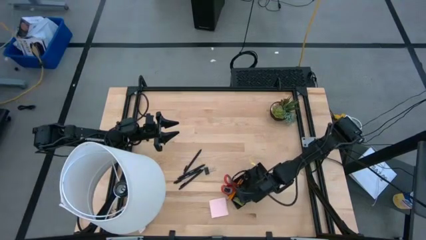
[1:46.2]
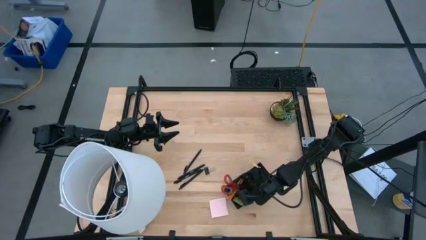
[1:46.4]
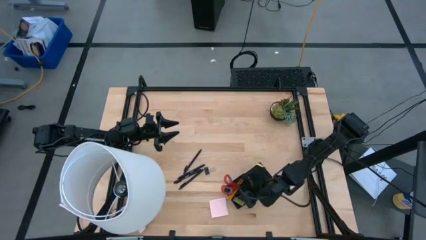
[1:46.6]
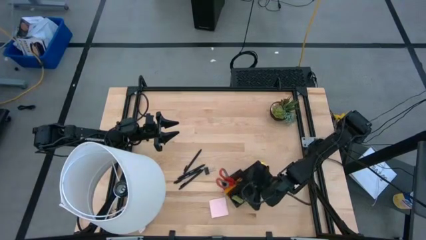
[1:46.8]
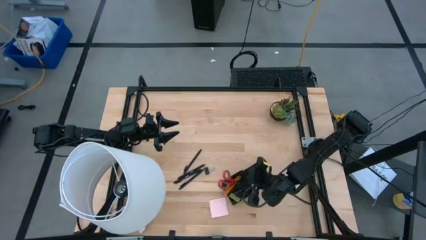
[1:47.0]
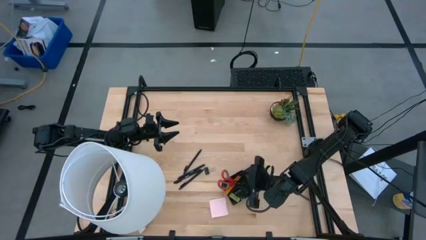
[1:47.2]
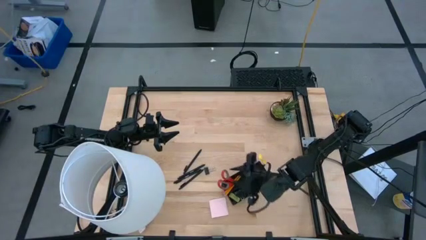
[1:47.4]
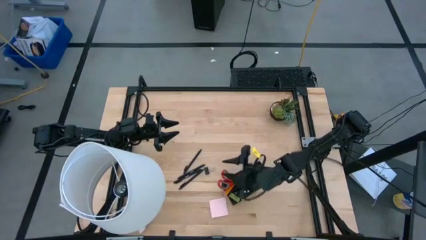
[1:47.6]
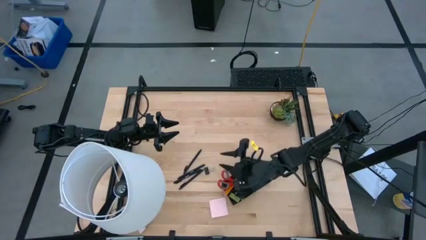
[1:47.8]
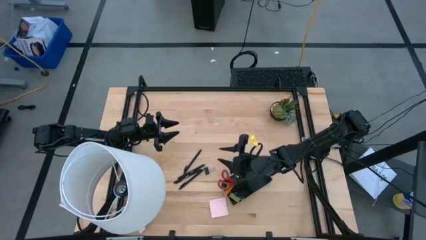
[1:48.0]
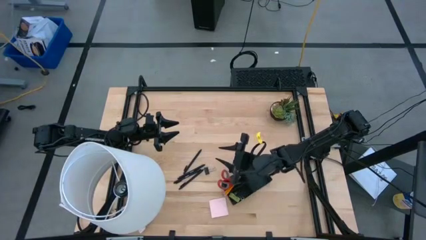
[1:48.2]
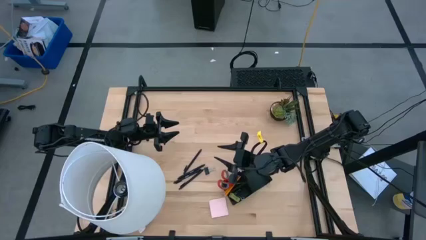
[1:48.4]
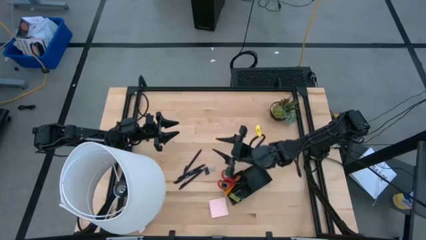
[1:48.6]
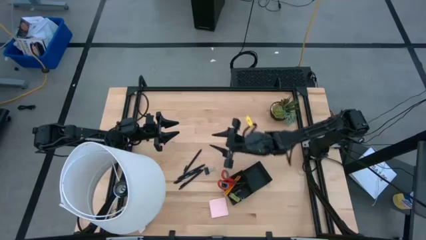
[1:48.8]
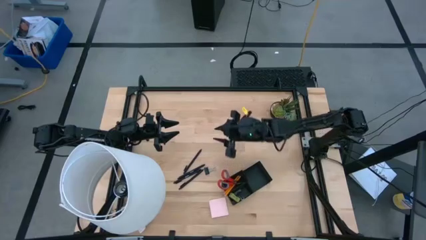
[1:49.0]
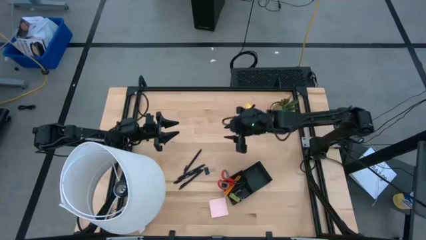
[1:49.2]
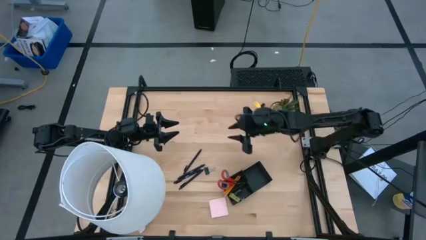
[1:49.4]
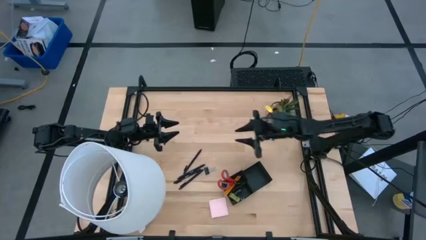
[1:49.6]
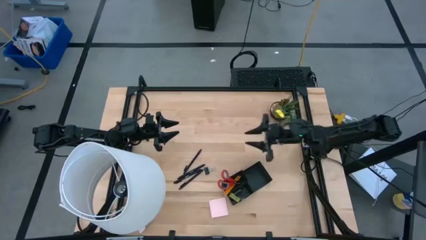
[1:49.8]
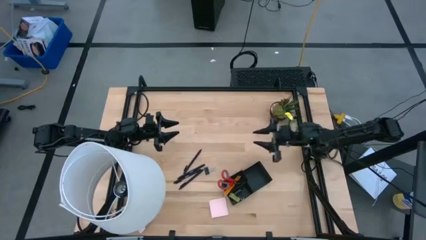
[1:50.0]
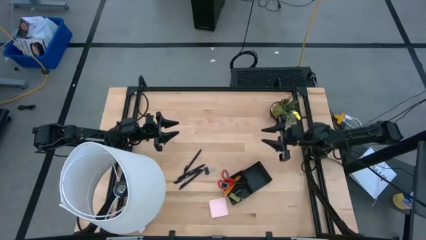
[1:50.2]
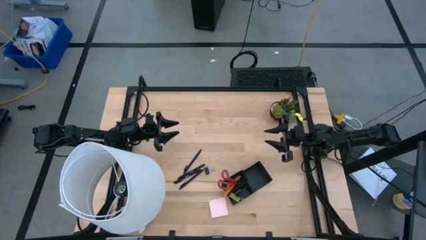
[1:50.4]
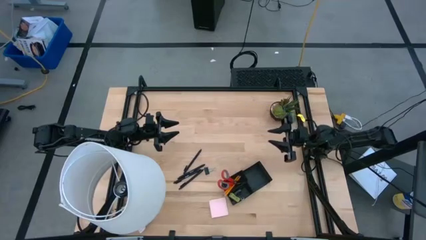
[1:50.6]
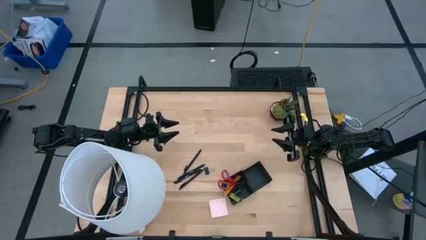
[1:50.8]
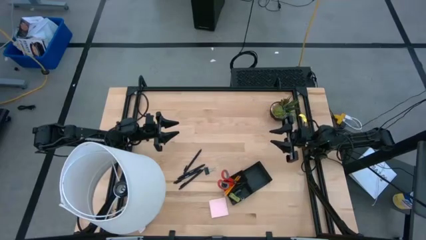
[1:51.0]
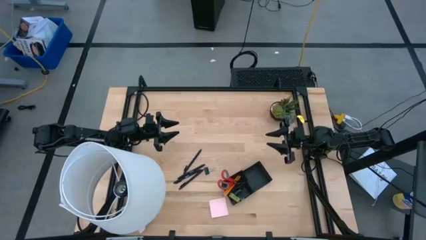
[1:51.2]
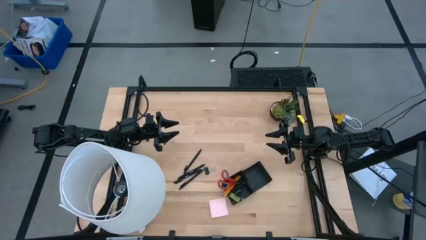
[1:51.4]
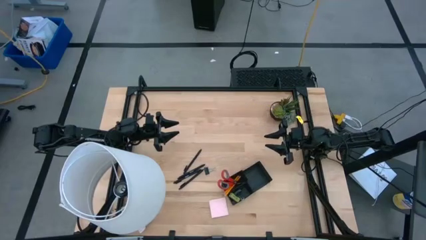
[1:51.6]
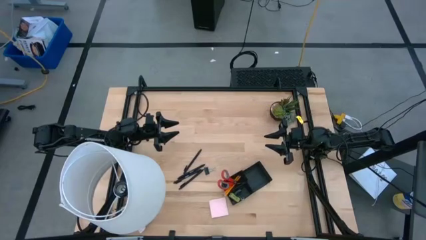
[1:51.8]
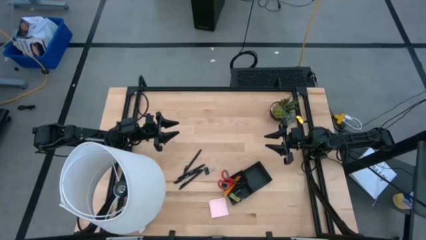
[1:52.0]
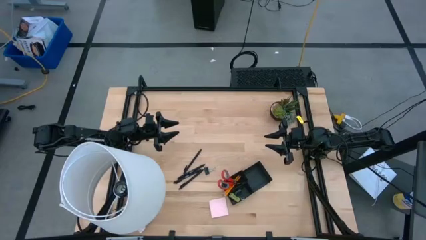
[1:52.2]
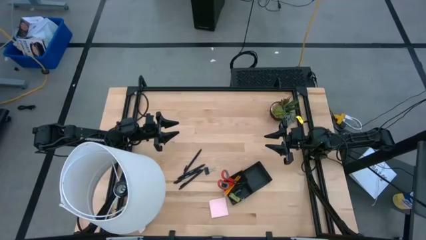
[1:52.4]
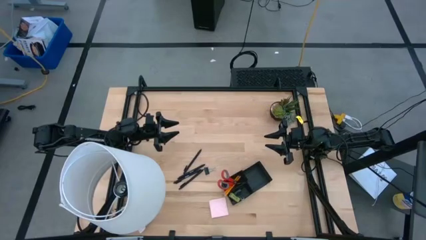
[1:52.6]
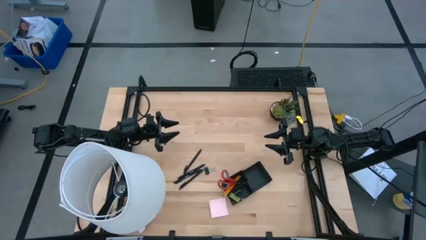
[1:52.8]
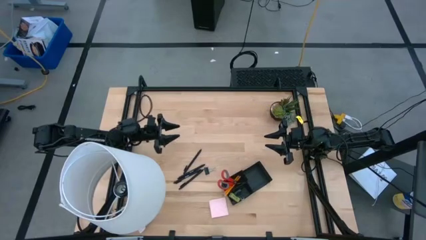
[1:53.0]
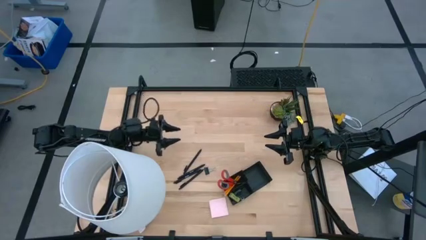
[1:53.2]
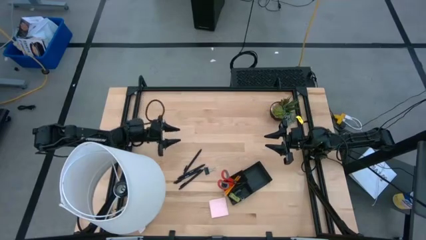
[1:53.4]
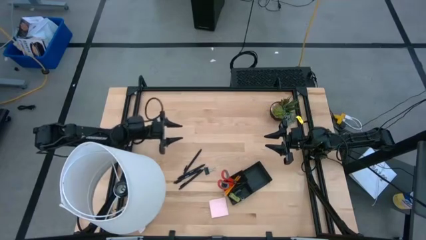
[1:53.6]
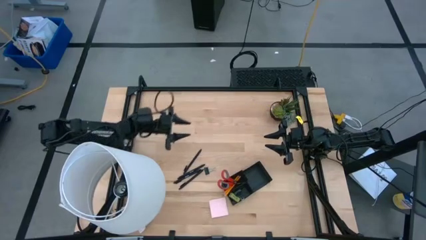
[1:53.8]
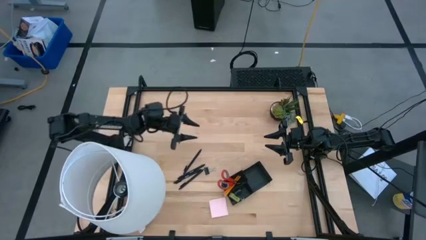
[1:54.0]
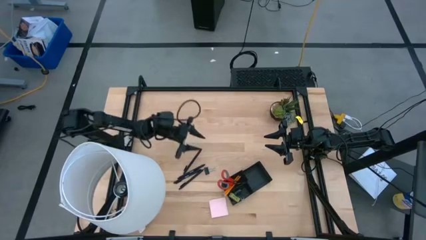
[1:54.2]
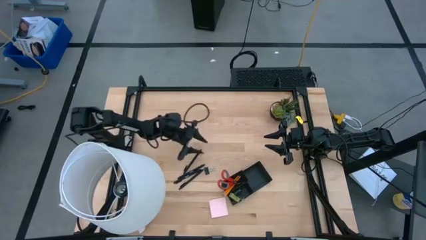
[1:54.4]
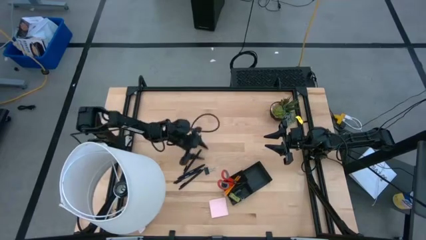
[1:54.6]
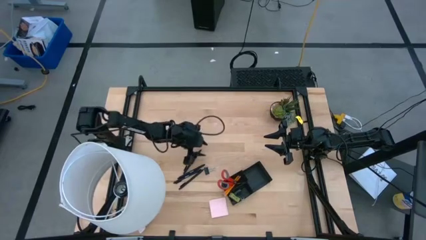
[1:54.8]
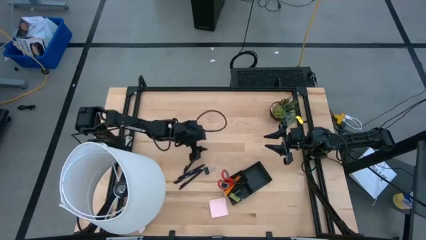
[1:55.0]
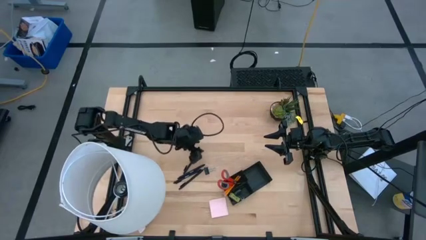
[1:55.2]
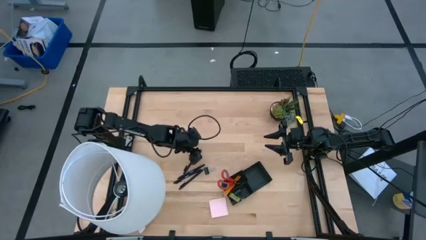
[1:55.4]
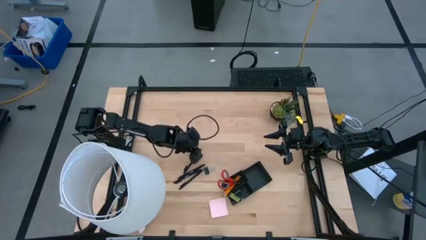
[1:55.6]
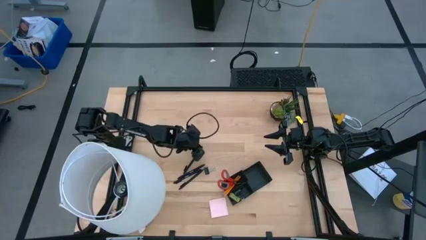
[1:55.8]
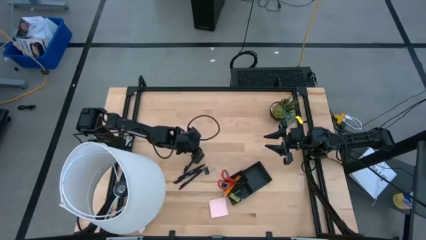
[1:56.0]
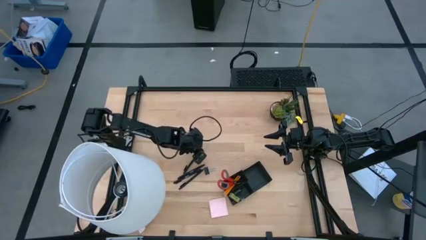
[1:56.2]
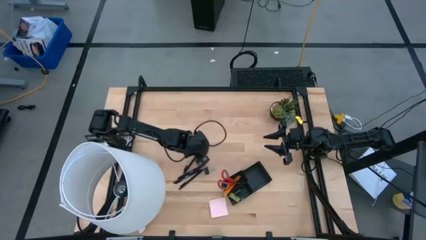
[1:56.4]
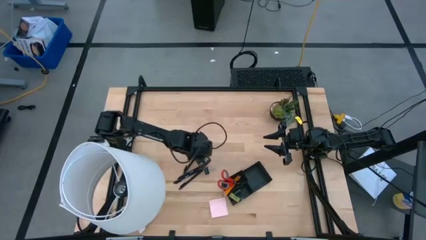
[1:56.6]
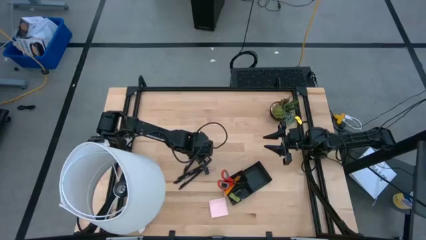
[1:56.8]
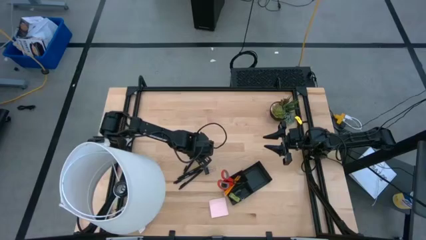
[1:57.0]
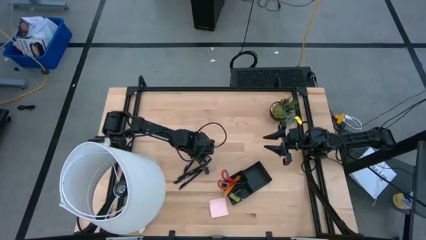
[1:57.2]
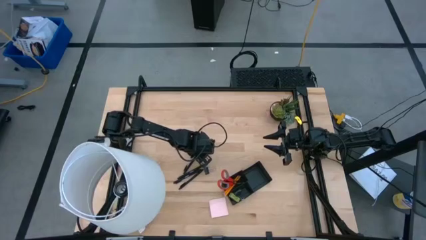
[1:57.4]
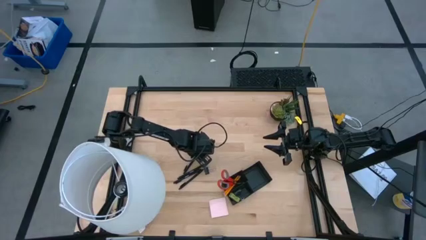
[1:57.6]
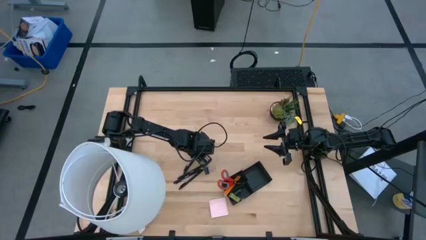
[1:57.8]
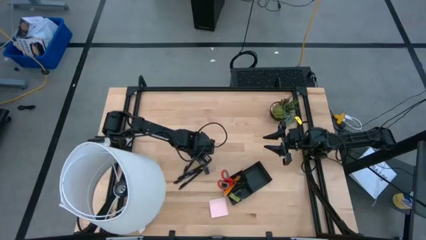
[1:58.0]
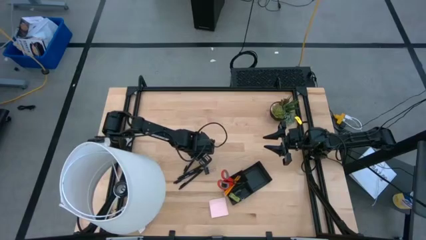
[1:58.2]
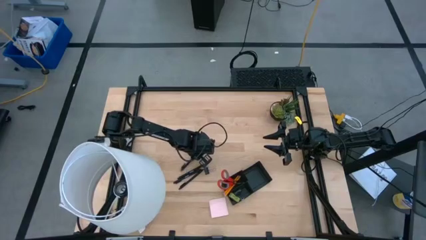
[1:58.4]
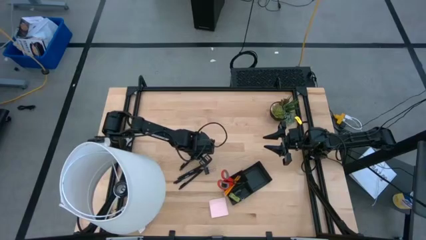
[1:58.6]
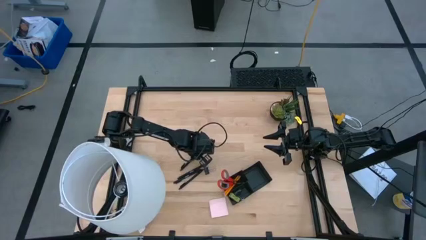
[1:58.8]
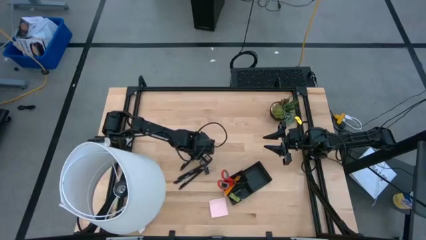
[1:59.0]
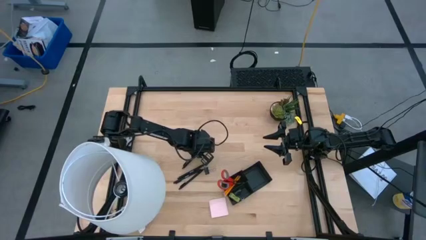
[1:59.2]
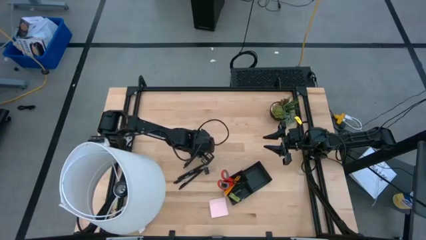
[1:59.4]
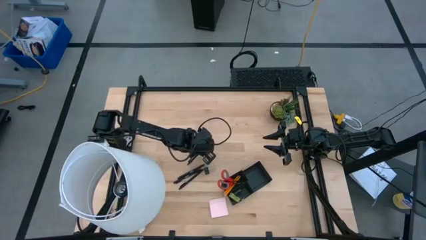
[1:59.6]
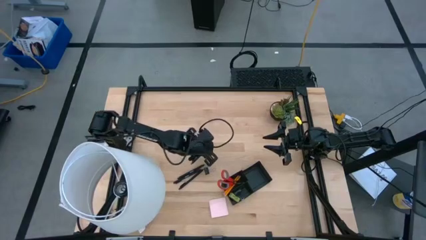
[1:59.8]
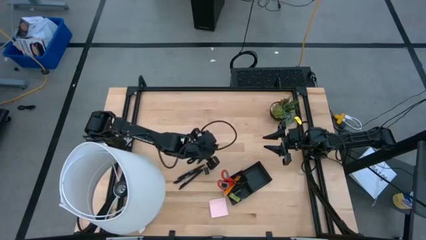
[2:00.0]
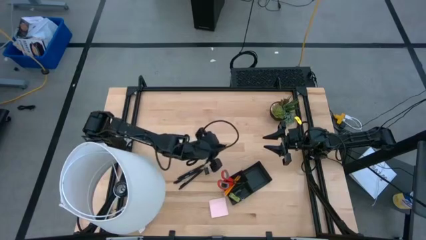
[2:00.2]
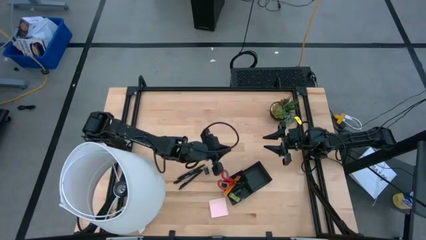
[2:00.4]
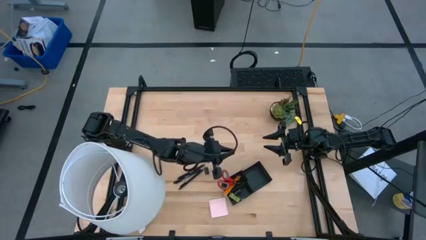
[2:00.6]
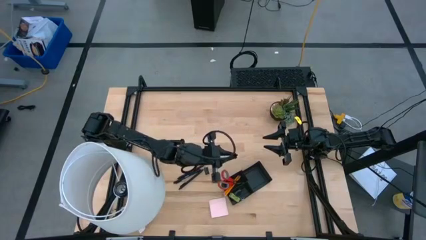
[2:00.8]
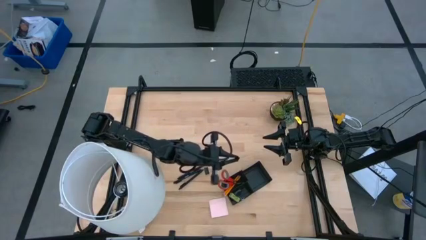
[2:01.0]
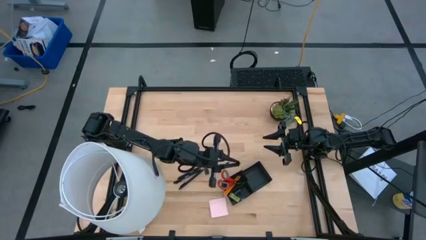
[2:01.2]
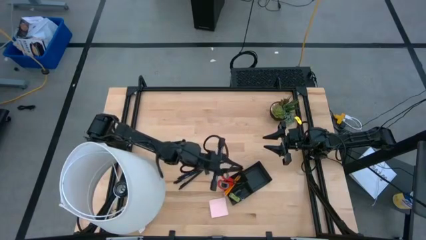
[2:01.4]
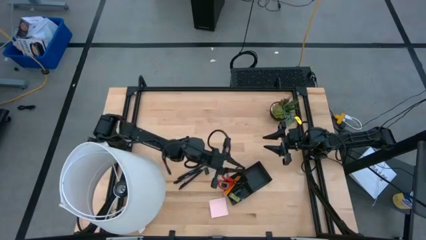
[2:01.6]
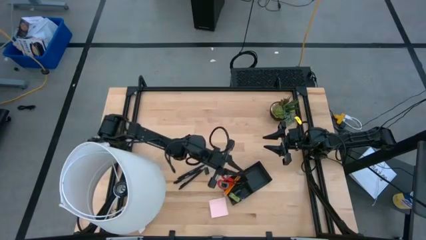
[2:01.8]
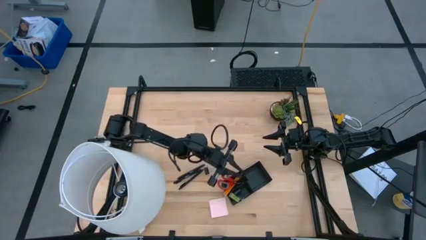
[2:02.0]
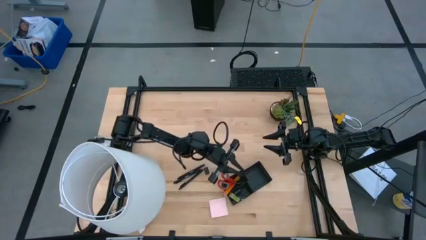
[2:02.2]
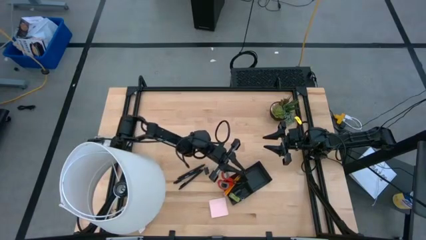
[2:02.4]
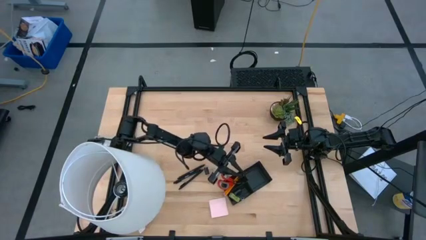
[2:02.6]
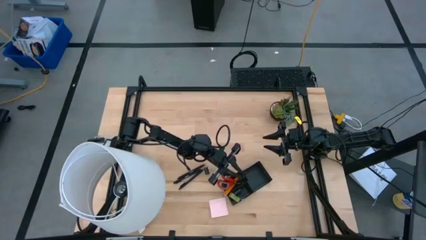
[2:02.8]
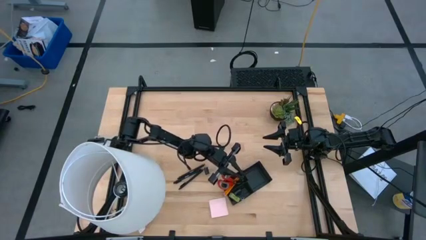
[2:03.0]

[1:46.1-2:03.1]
Task: Pick and place office supplies into organizer
Put the black pen into the black desk organizer
